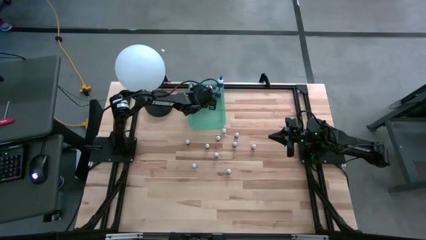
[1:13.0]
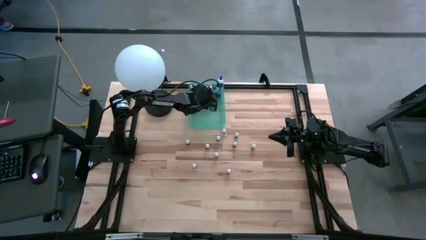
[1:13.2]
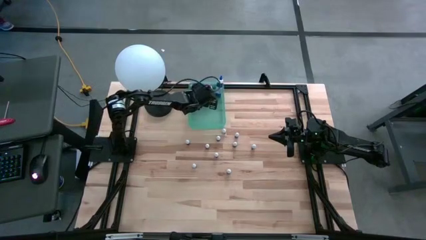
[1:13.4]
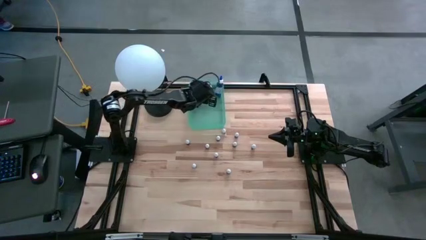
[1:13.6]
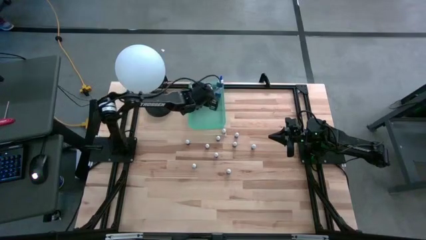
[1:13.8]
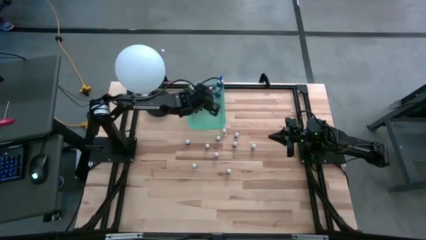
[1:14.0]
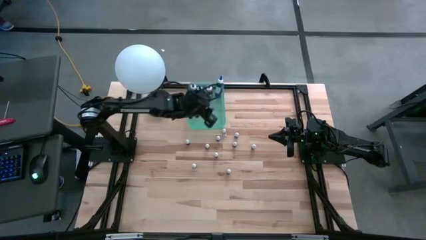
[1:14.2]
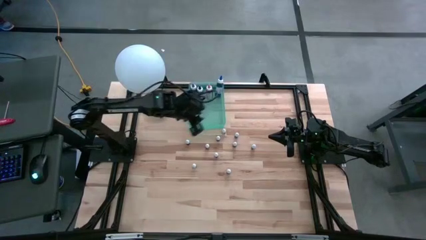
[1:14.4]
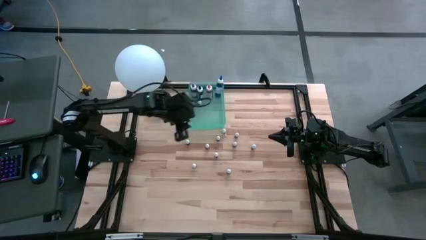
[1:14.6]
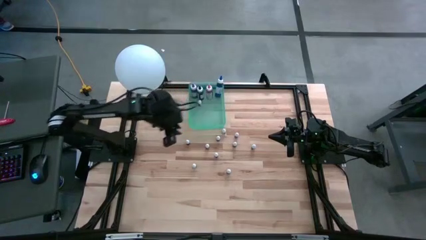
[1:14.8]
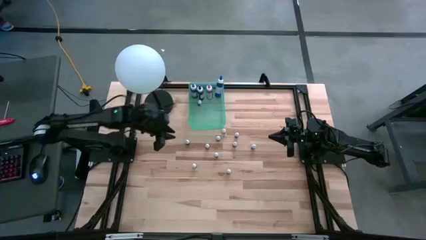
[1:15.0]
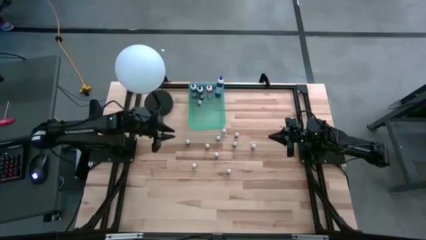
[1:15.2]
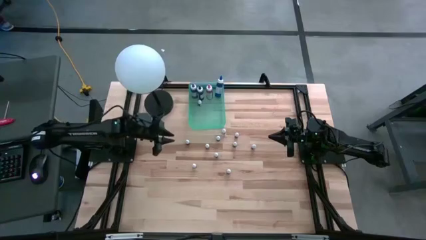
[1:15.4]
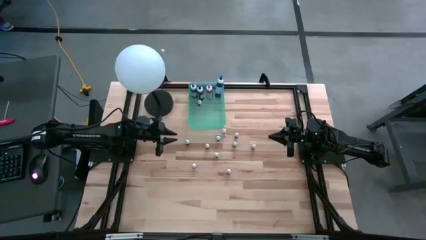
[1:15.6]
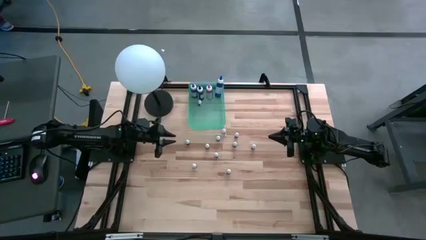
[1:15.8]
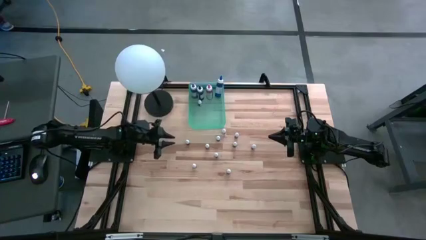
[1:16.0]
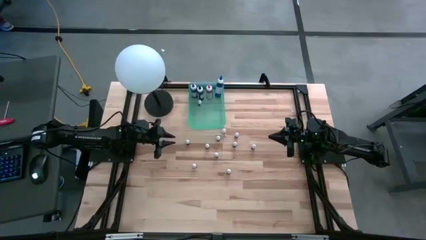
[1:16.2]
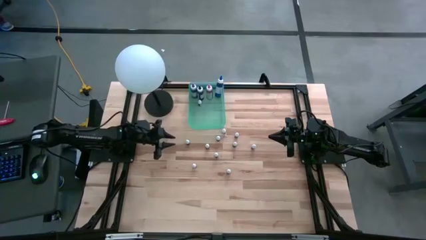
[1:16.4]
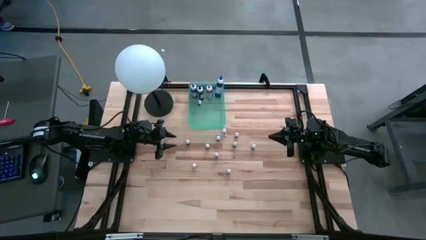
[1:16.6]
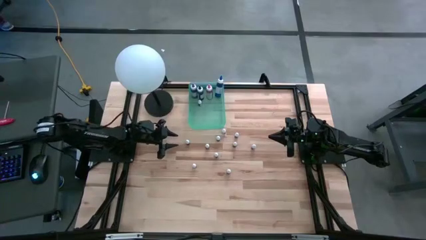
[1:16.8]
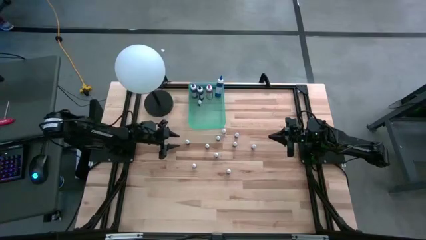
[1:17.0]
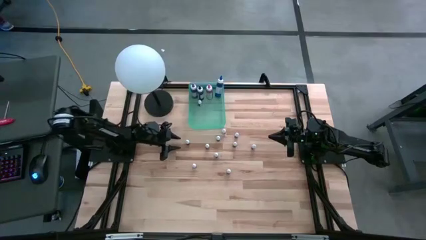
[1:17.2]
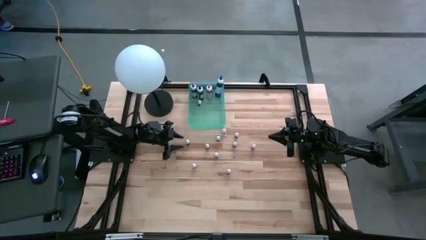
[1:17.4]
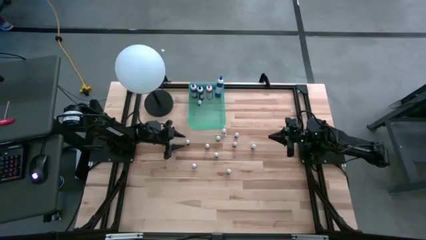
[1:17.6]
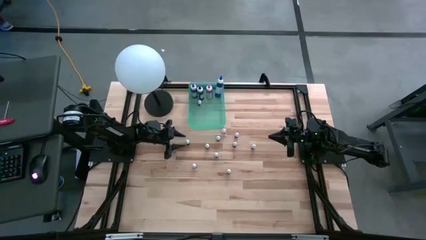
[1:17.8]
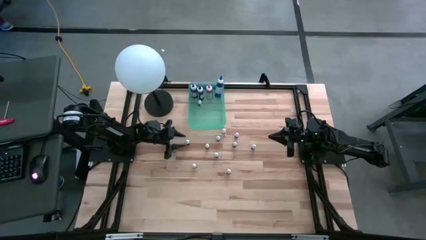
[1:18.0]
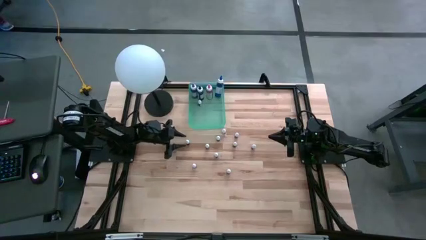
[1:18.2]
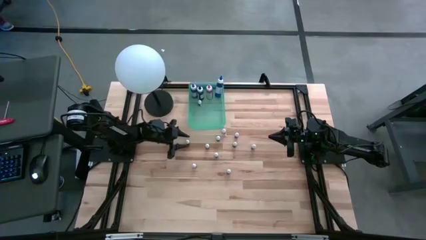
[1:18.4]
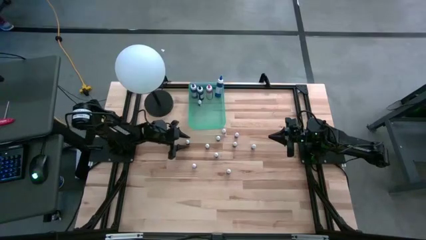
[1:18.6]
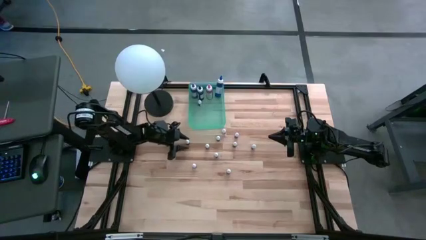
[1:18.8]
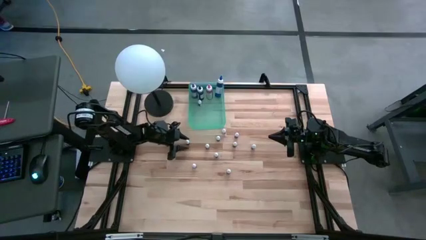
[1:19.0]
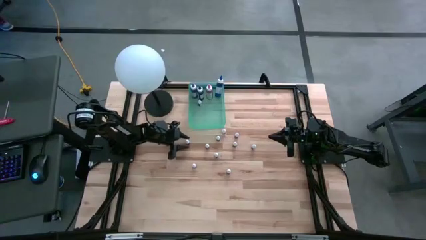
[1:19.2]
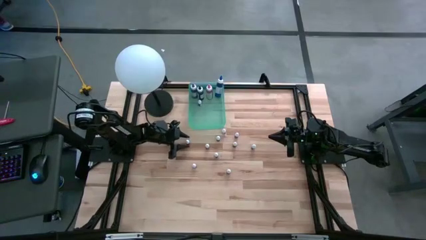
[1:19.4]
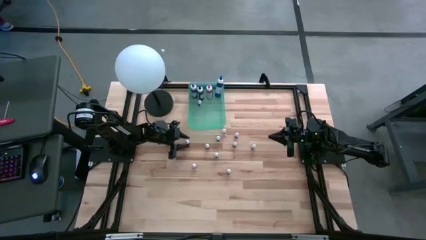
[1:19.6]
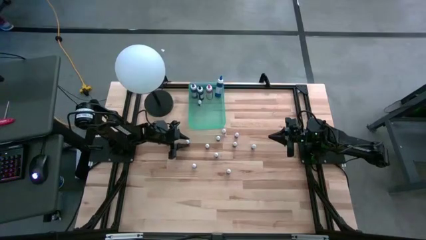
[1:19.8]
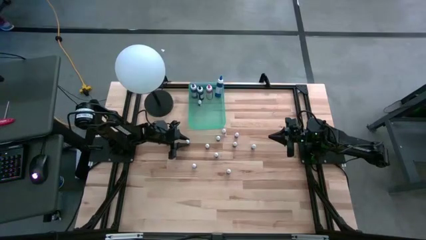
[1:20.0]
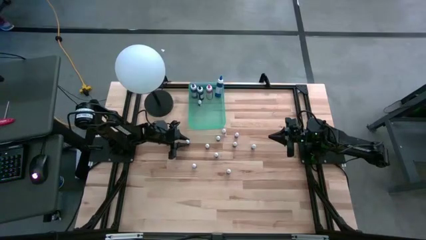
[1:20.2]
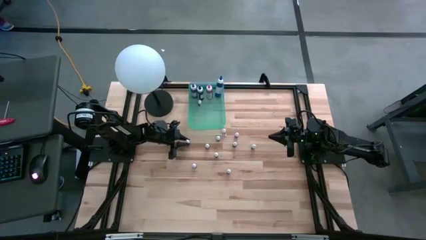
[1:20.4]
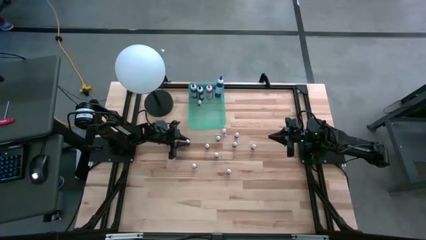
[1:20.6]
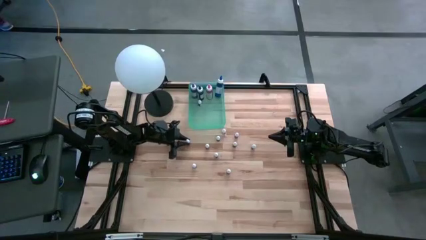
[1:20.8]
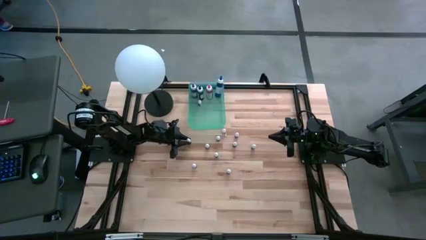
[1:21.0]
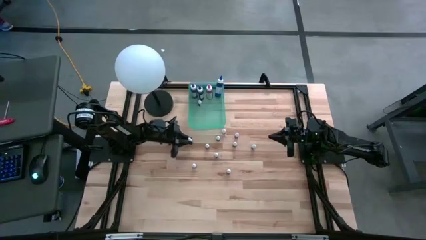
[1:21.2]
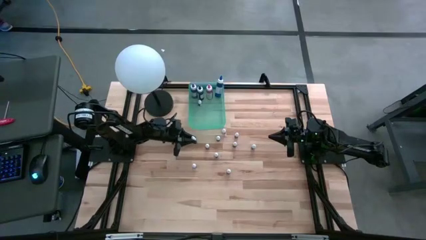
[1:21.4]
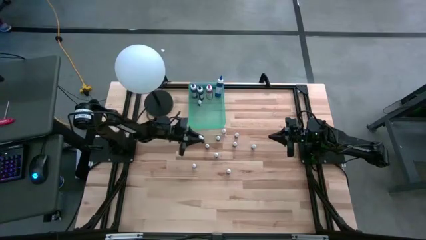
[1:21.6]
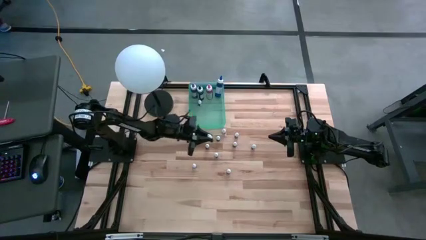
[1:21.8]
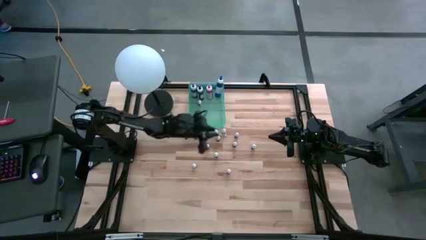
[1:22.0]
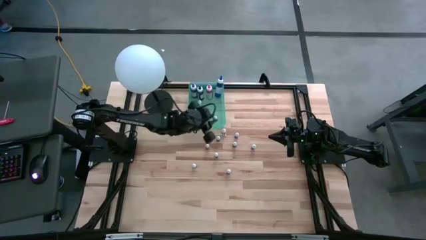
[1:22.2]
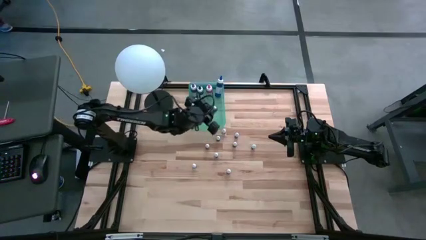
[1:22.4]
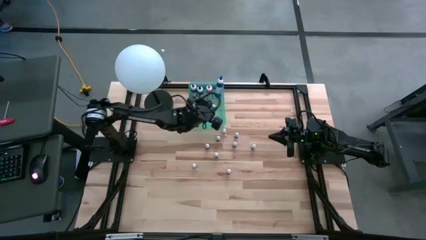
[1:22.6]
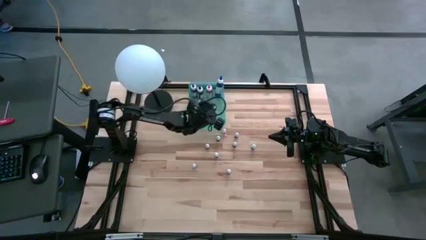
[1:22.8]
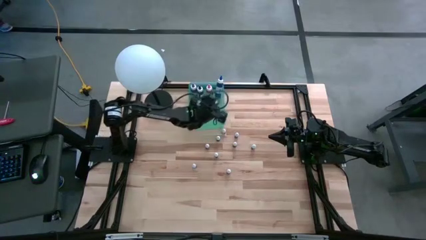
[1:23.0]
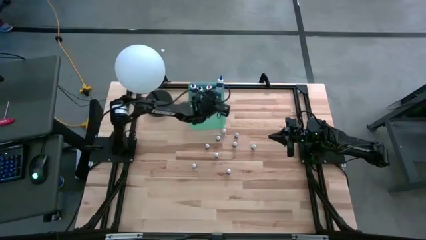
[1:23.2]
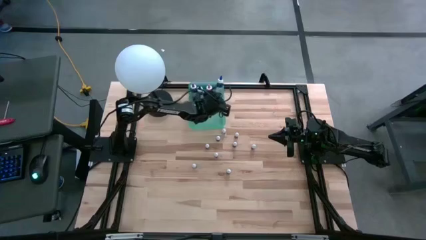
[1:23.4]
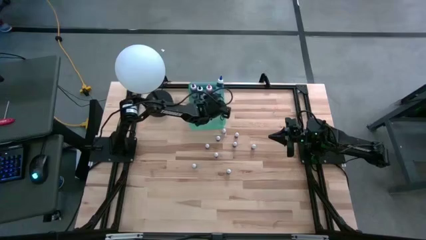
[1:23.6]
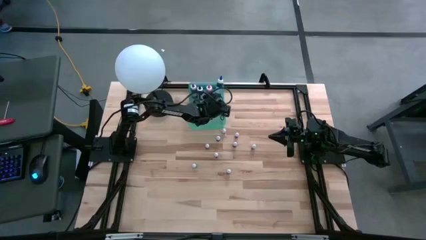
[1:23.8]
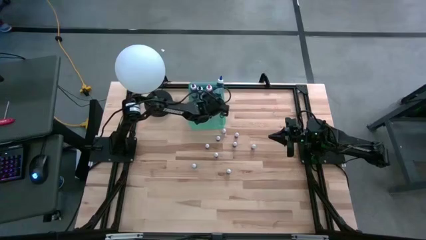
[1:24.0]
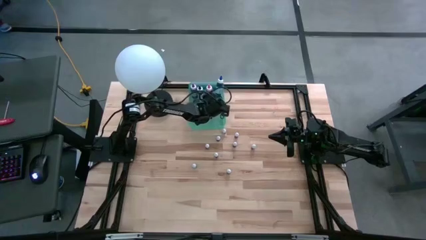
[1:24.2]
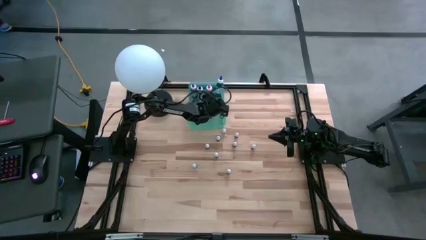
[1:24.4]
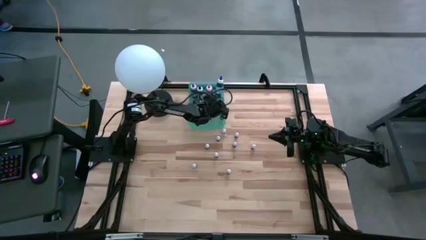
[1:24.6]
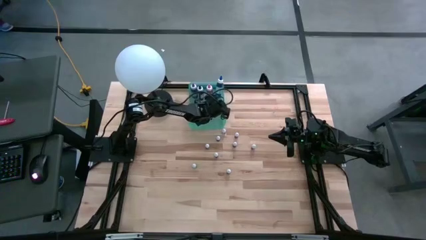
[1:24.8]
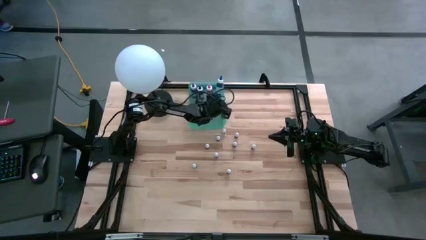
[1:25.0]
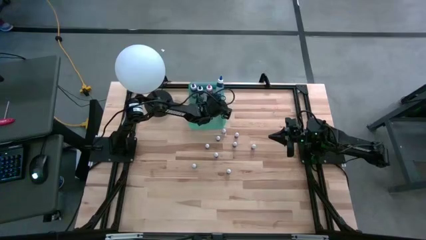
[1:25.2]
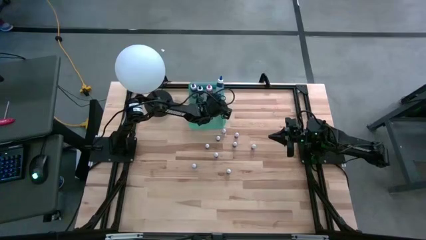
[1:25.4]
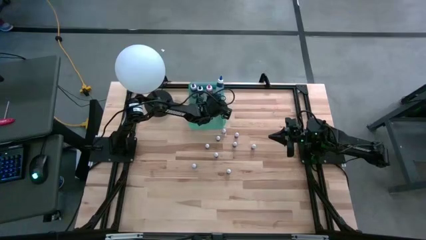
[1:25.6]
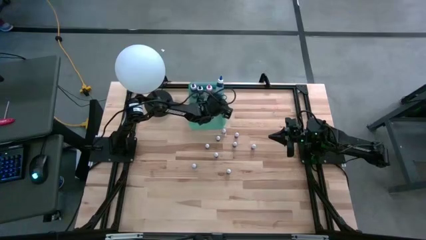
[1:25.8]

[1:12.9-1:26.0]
Task: Pick & Place food coloring
Put the small brown food coloring bottle into the blue bin

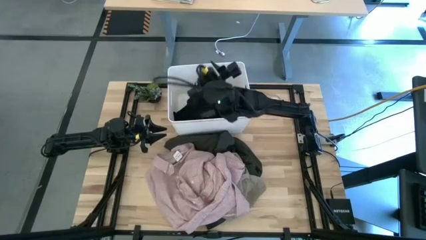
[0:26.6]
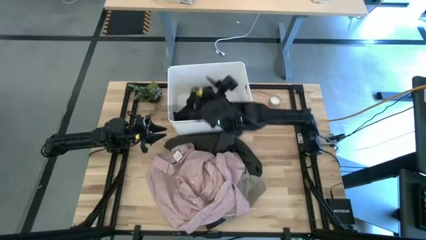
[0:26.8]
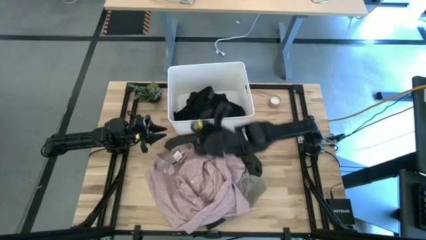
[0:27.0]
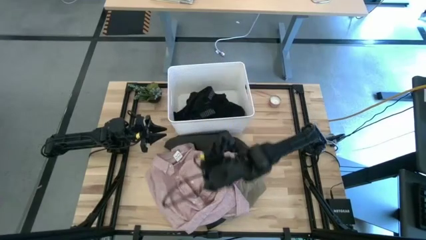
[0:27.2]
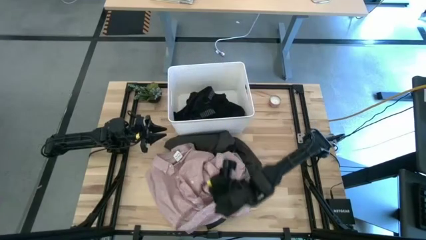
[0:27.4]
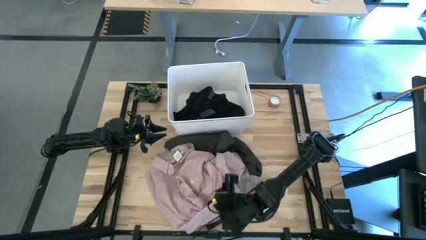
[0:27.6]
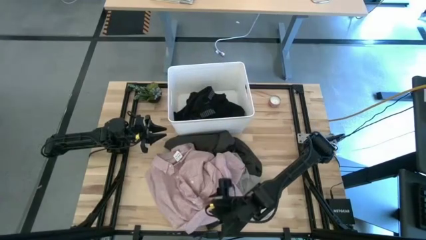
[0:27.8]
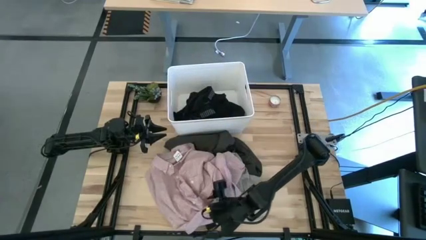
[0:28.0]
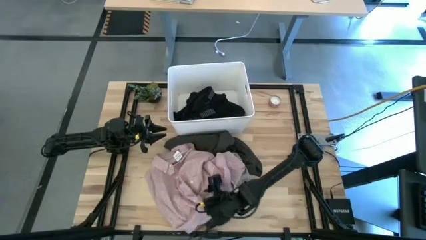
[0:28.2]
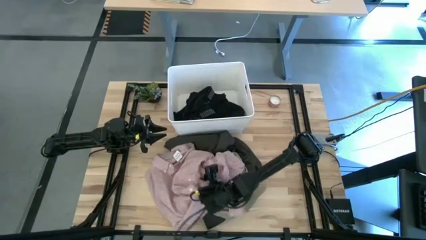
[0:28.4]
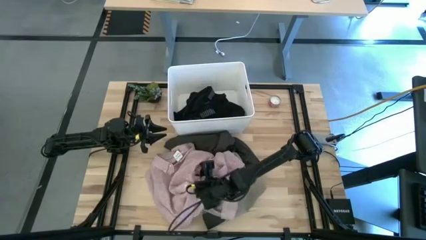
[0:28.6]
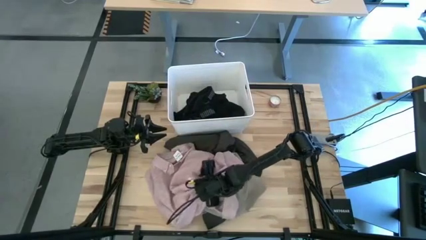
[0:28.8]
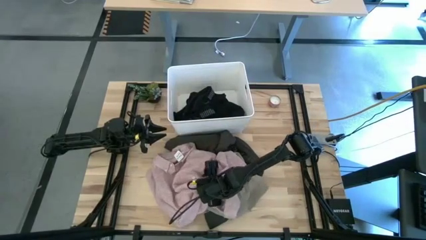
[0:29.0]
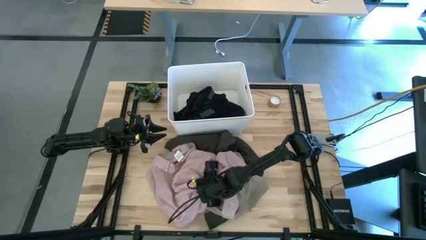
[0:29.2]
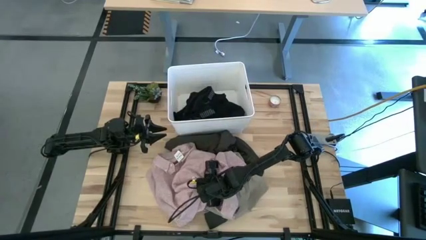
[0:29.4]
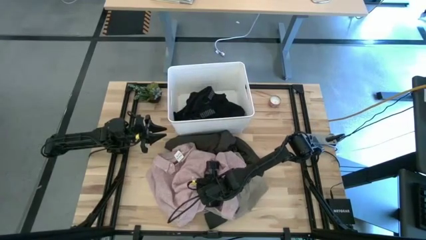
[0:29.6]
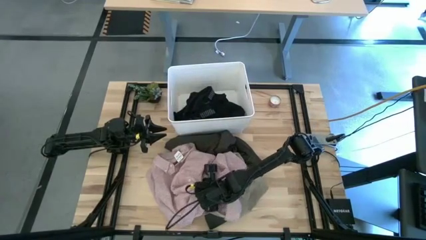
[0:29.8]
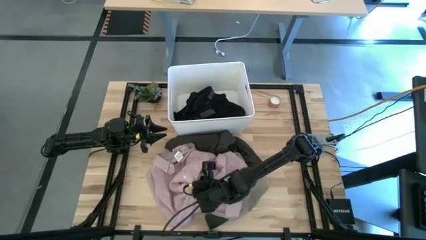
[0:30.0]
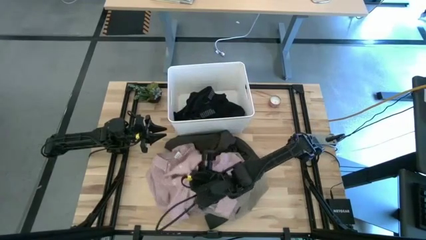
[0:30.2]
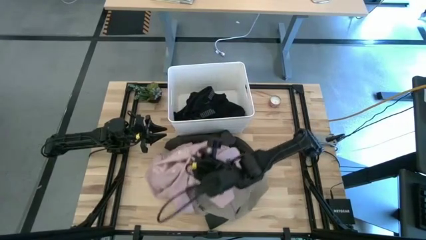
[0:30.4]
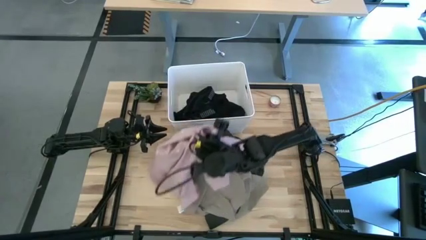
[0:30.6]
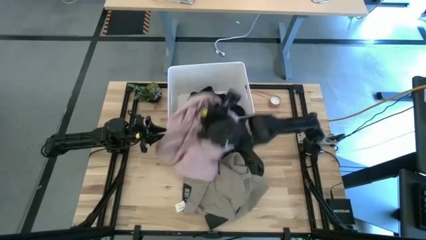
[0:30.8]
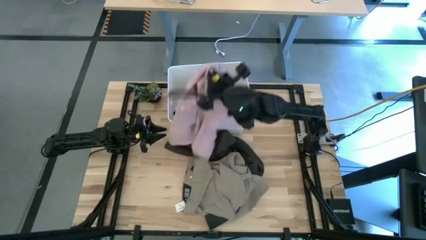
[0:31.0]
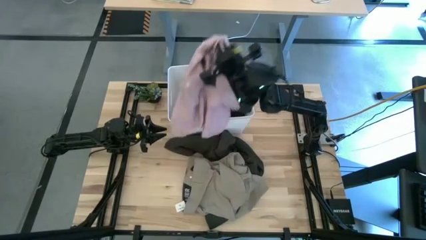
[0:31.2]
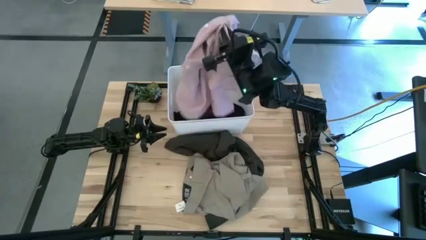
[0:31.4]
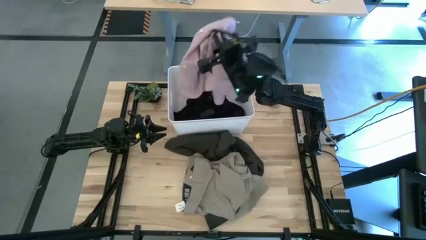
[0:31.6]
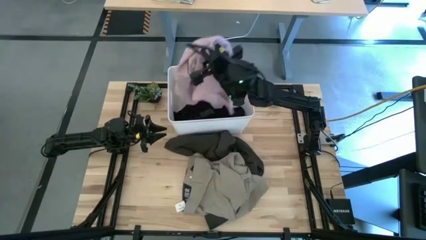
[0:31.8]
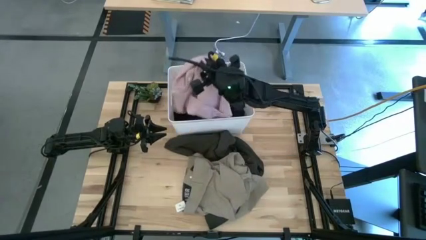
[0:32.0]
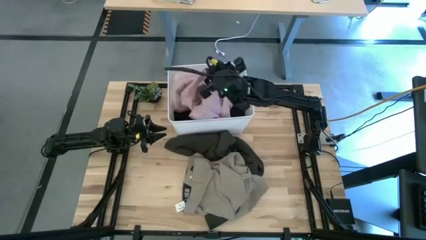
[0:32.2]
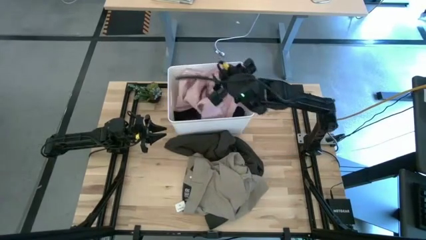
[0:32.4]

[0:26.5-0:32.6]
Task: Sort clothes
Put the pink shirt into the white bin
